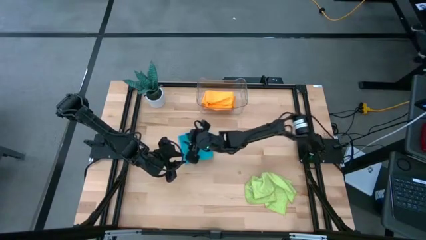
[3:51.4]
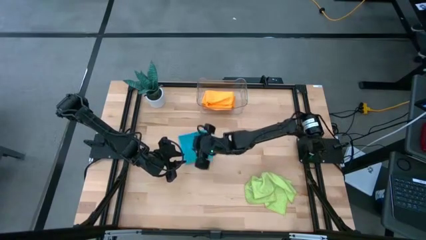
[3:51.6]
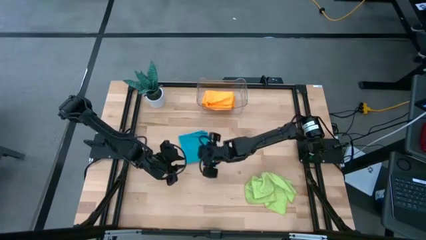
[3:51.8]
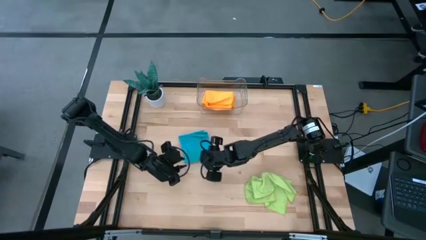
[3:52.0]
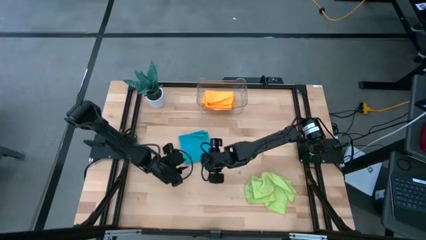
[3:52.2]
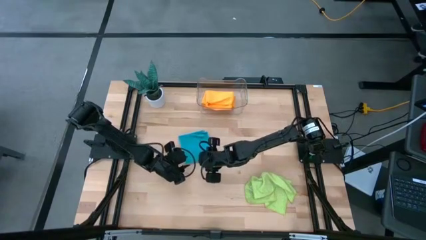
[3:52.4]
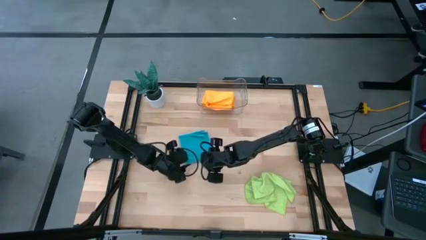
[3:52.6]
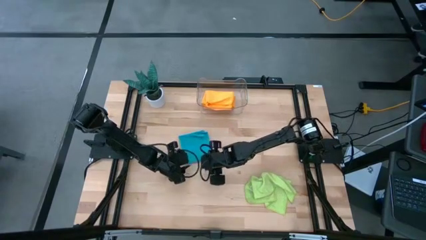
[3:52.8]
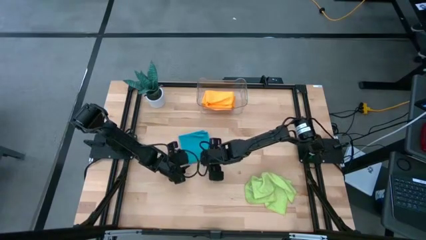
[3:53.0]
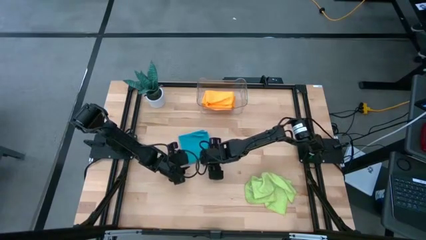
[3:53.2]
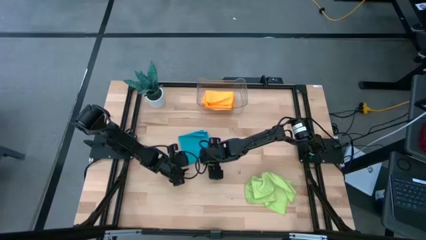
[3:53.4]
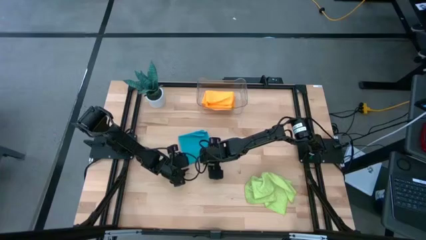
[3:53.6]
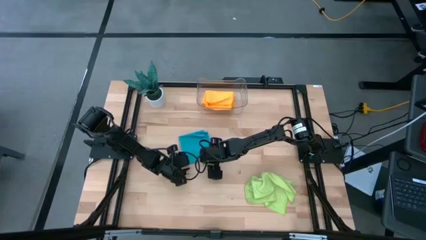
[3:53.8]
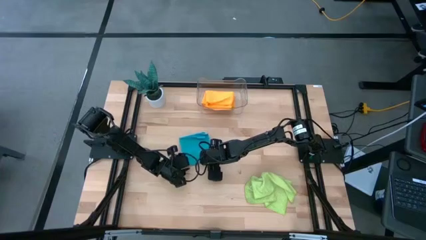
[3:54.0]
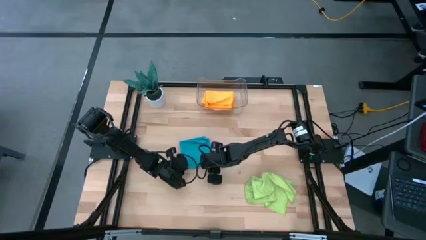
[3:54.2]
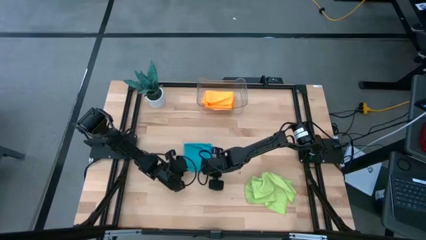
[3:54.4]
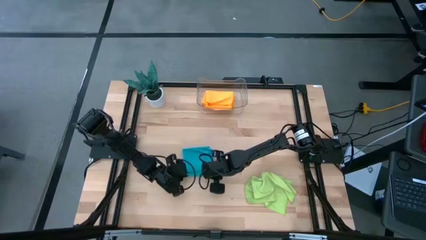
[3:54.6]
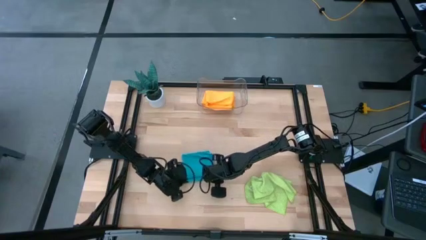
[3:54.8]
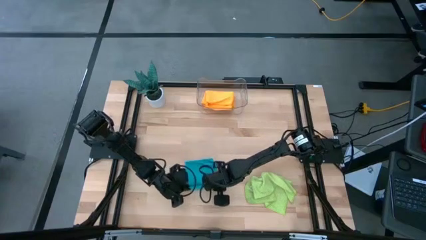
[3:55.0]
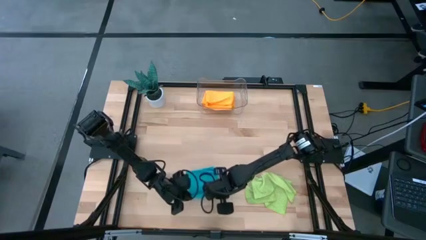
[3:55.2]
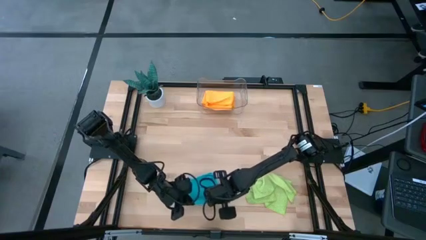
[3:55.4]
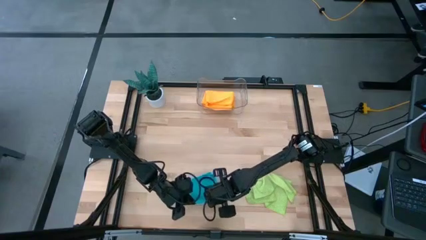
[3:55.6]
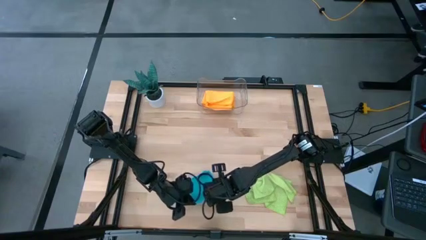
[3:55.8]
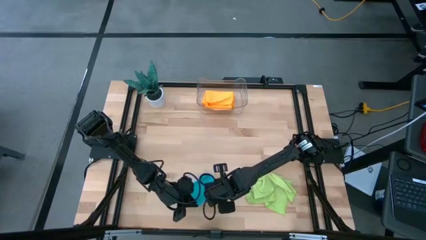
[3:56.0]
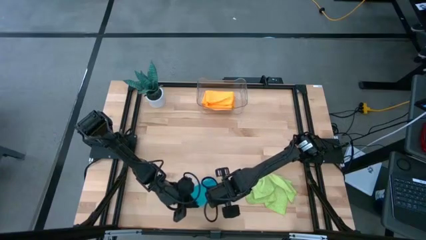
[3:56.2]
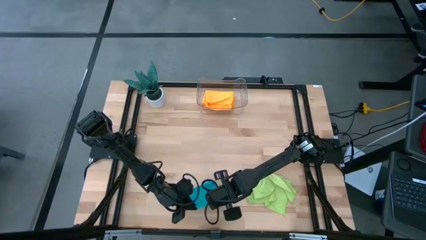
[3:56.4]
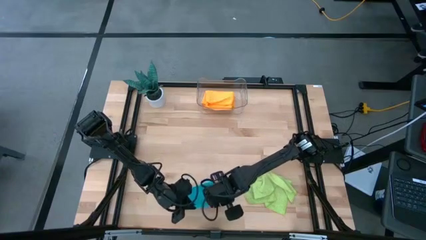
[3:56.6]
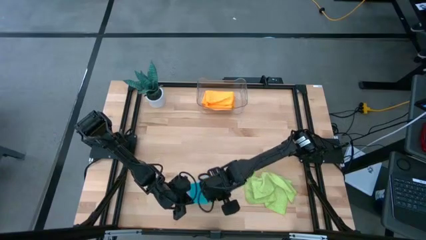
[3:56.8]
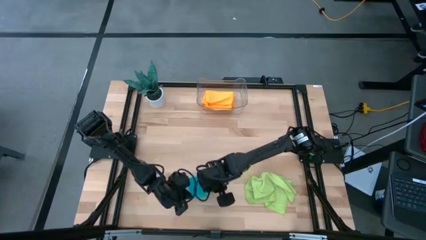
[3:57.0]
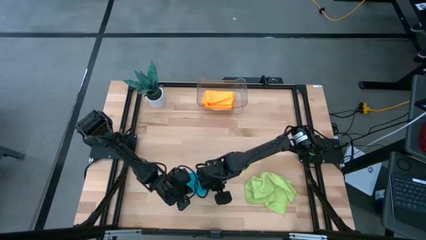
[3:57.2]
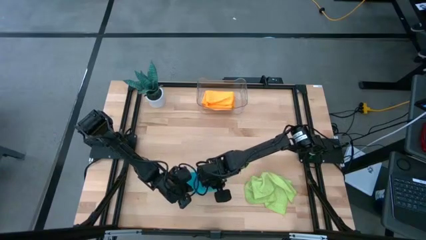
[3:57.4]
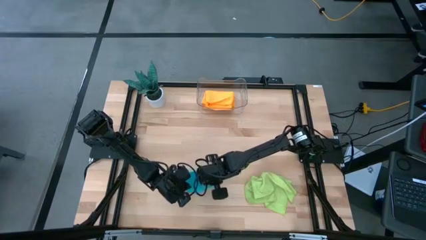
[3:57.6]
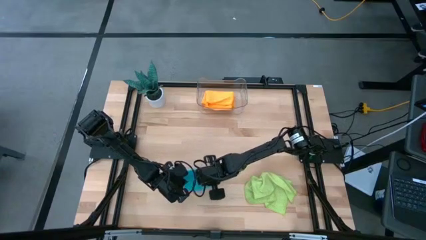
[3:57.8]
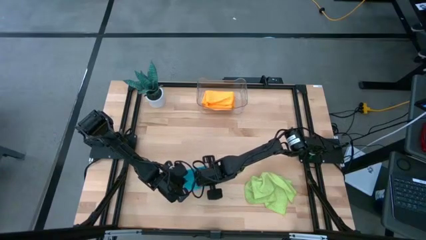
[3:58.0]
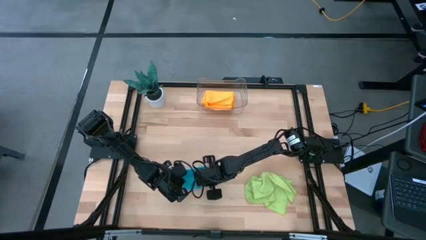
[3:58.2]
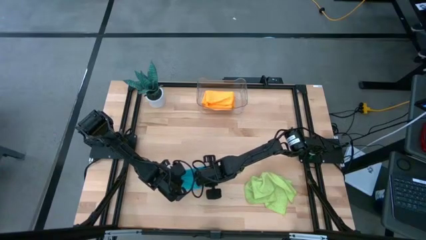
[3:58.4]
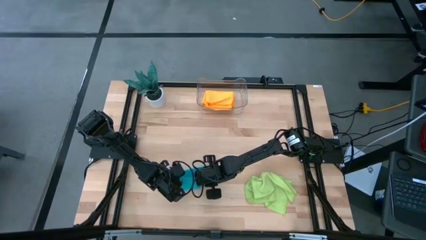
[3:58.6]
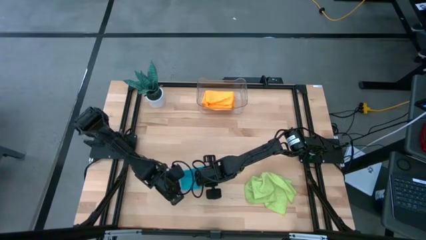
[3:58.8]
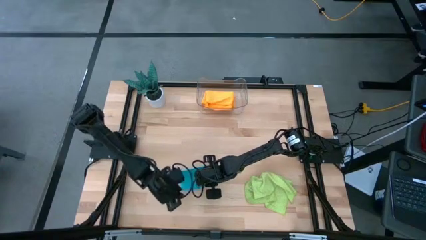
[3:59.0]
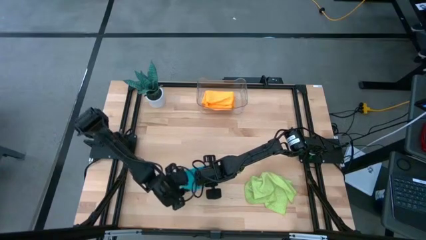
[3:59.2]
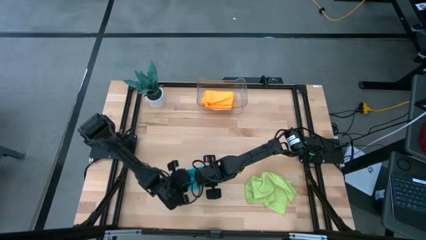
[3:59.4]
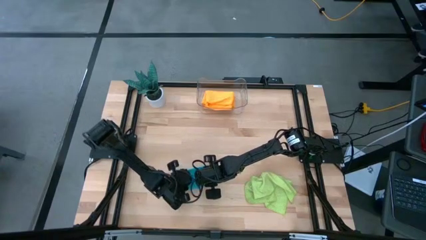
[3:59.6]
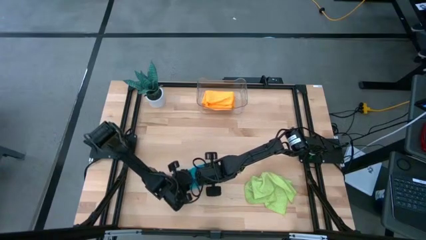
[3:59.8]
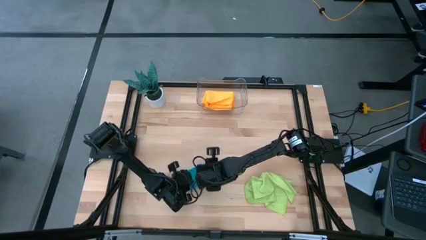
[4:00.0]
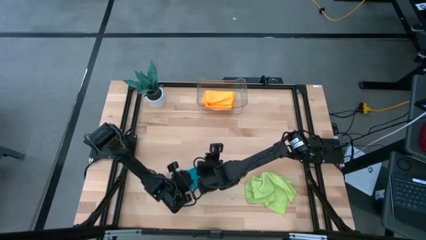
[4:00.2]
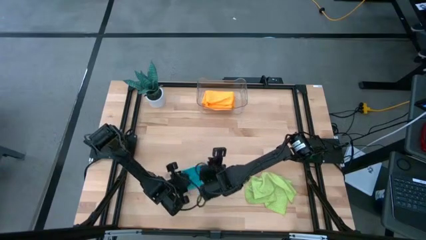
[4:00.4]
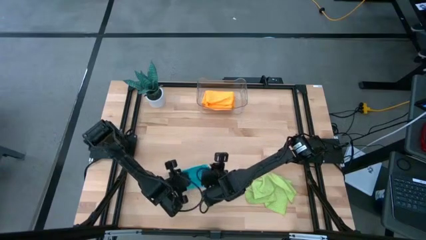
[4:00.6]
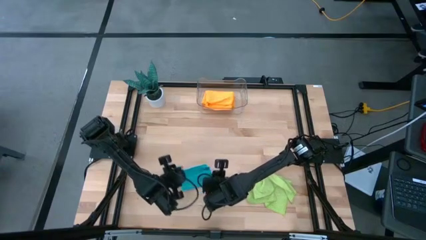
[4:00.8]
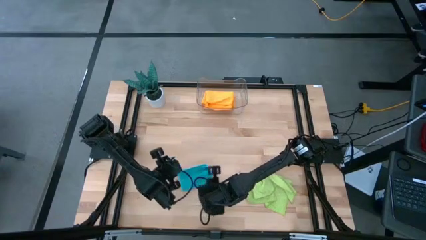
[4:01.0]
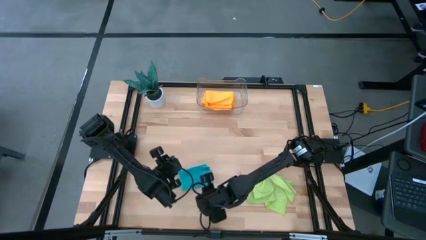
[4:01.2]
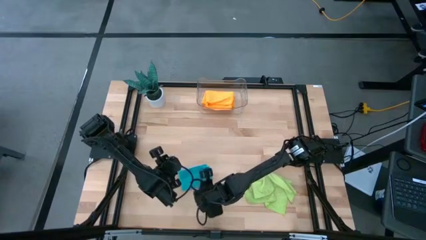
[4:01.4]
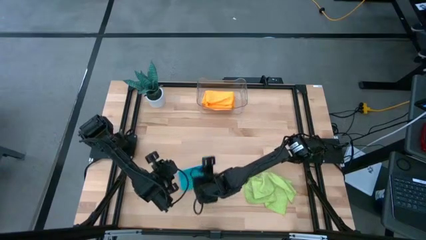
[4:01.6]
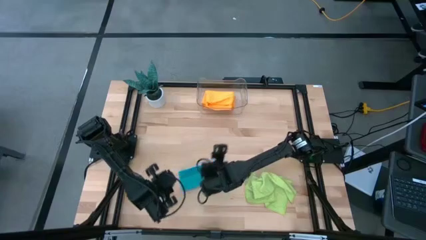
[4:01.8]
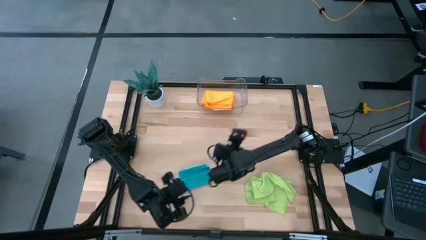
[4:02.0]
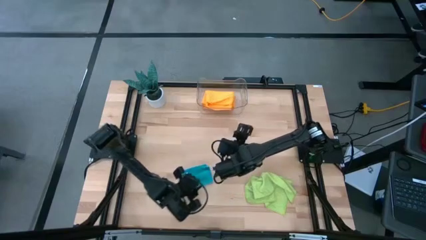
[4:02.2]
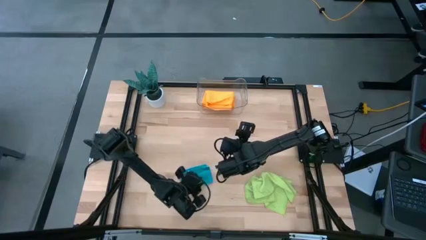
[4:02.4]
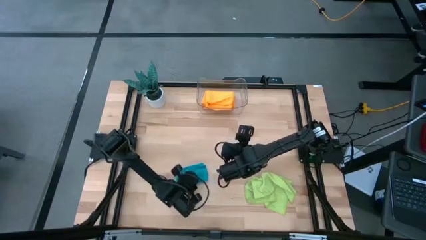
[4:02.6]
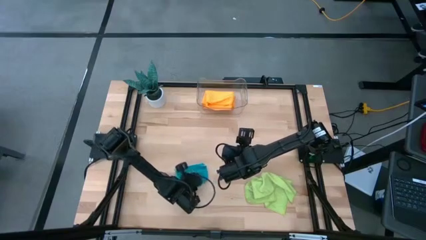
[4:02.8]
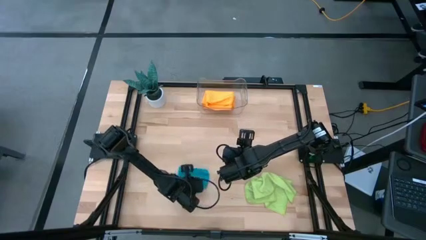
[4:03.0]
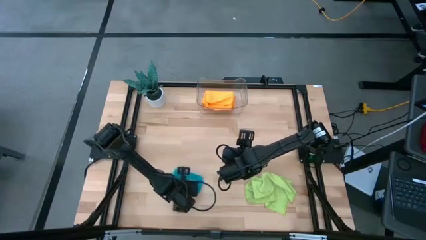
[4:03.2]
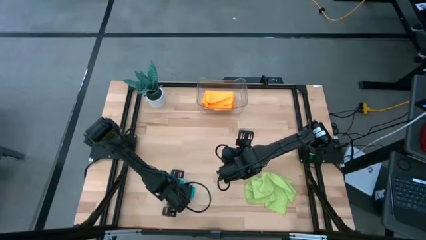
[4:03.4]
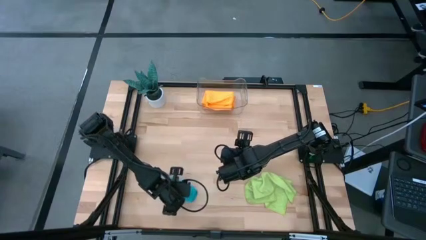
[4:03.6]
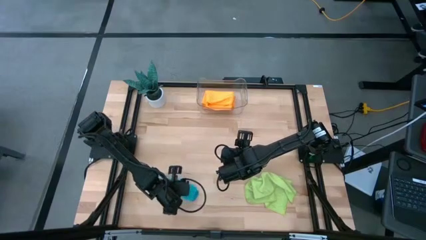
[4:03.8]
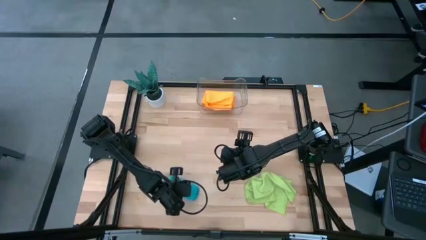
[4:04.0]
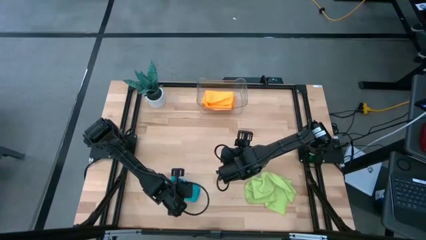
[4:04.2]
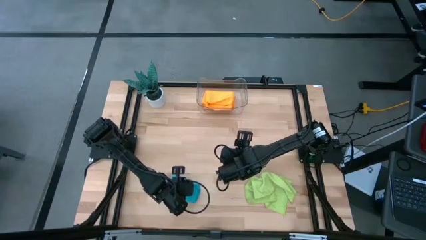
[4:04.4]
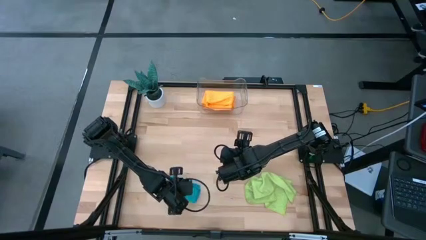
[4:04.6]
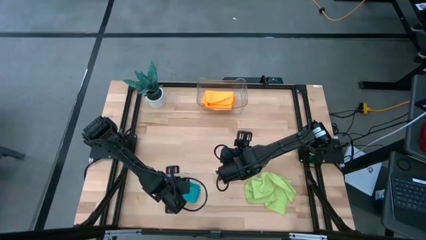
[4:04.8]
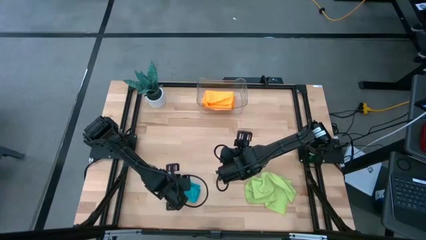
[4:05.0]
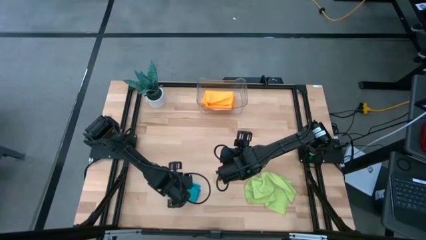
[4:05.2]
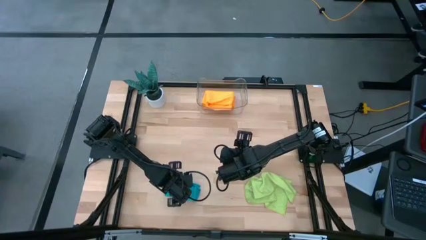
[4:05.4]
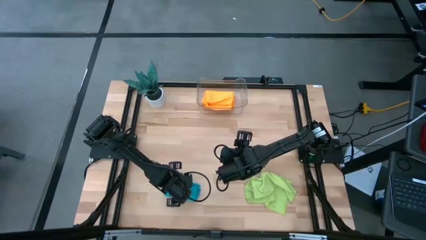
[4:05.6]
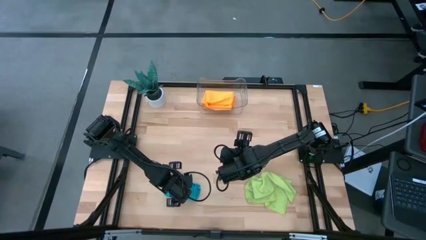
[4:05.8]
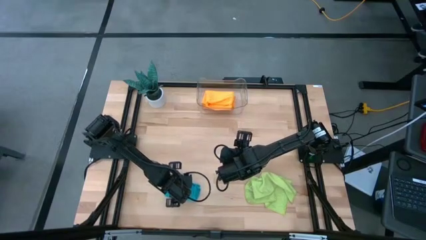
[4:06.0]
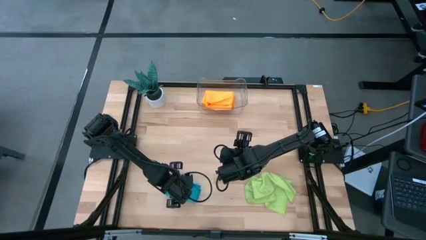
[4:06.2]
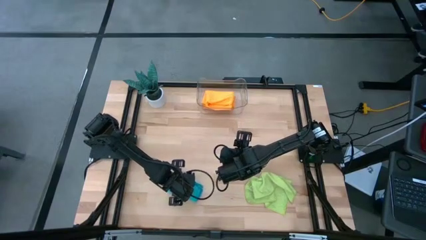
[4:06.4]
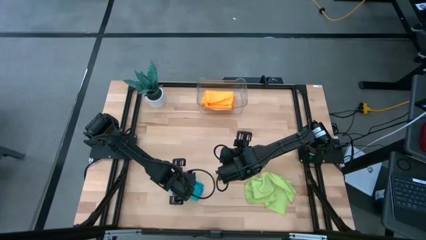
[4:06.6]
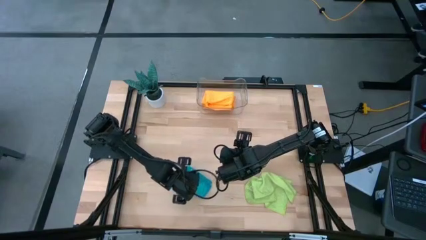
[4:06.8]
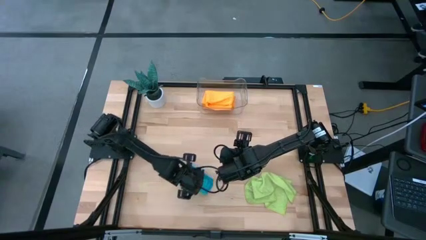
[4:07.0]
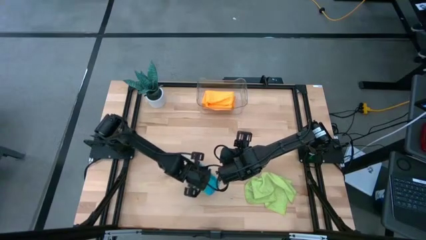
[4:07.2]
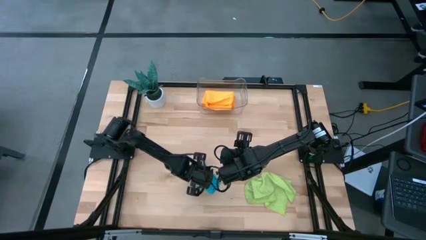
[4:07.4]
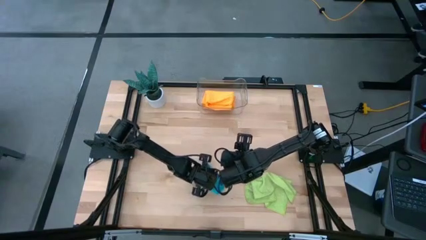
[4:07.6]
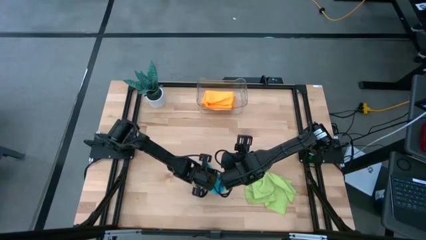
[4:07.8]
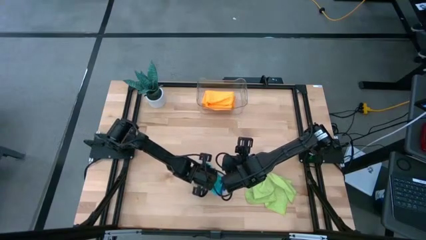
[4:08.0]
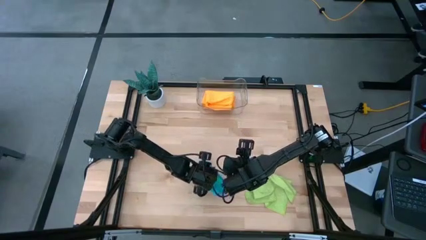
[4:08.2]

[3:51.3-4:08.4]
Task: Fold microfiber towels
Fold the blue microfiber towel
